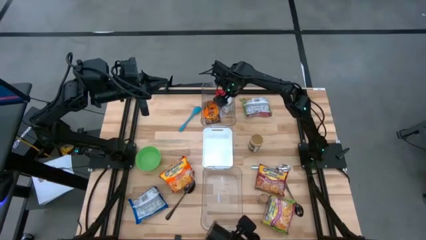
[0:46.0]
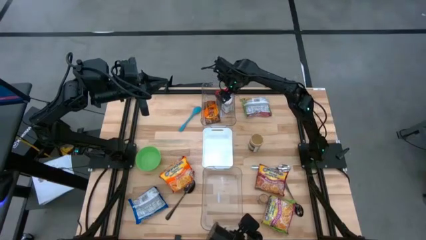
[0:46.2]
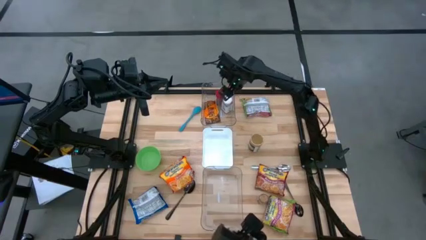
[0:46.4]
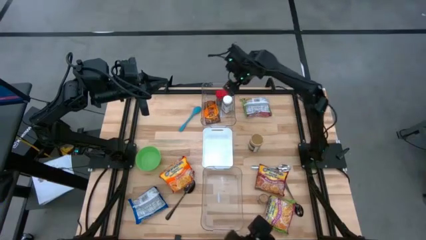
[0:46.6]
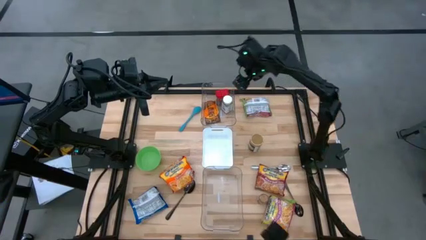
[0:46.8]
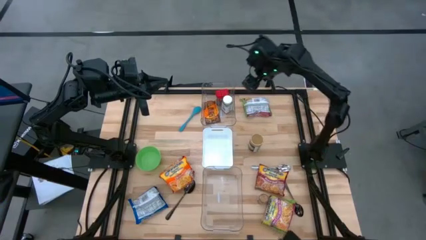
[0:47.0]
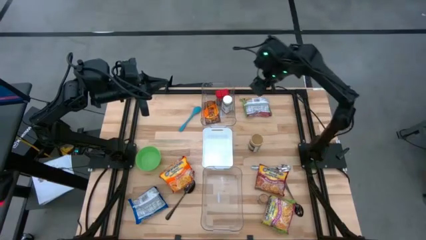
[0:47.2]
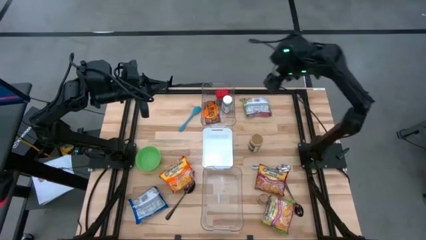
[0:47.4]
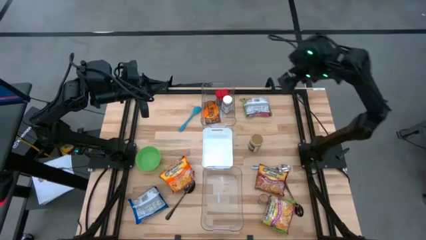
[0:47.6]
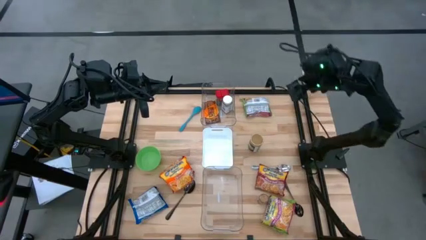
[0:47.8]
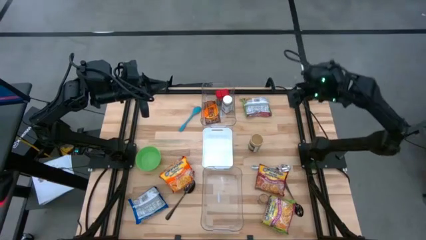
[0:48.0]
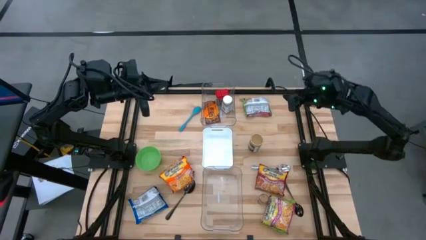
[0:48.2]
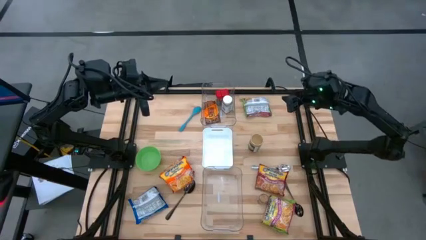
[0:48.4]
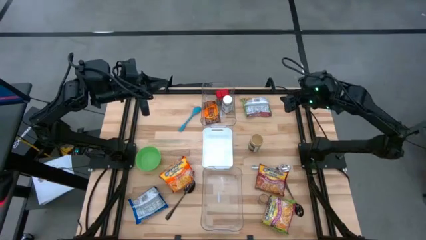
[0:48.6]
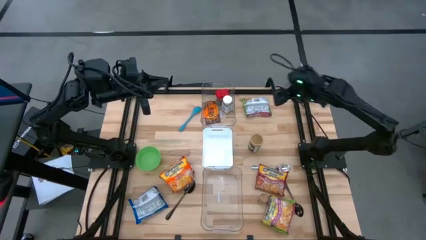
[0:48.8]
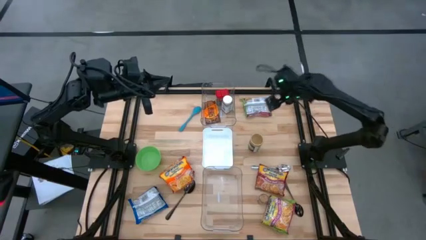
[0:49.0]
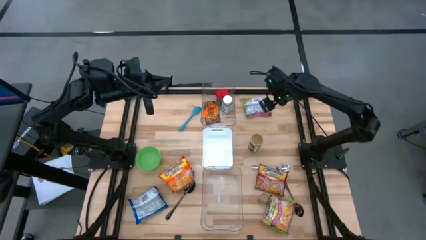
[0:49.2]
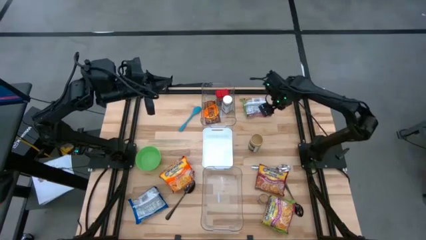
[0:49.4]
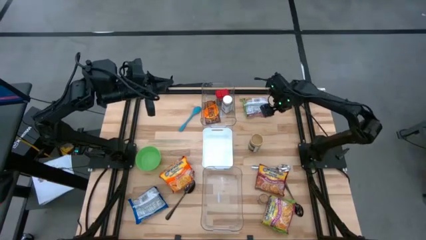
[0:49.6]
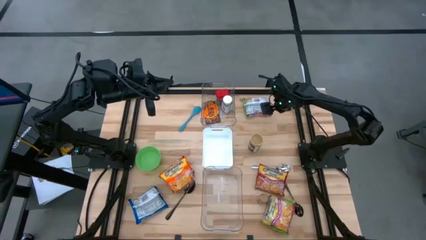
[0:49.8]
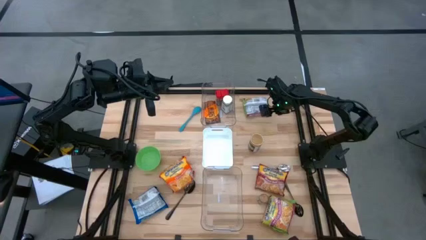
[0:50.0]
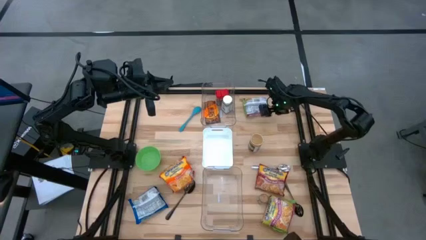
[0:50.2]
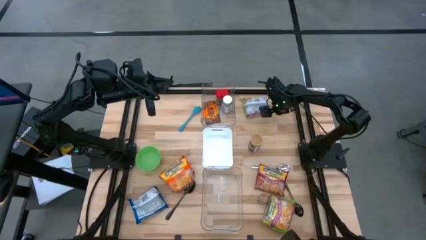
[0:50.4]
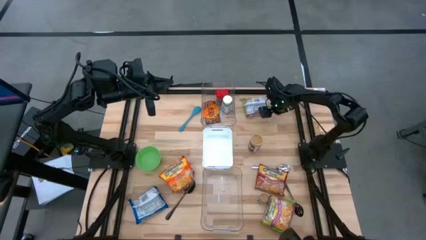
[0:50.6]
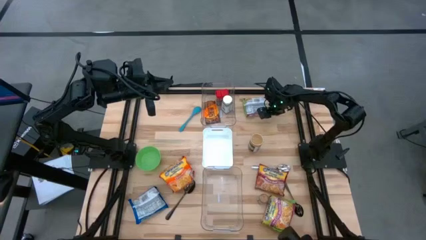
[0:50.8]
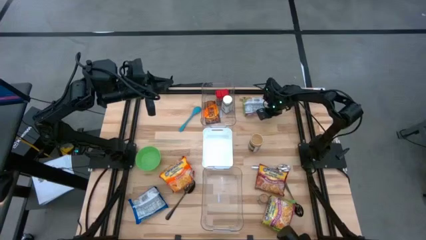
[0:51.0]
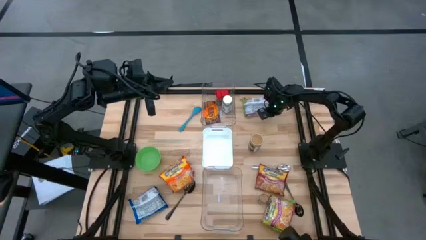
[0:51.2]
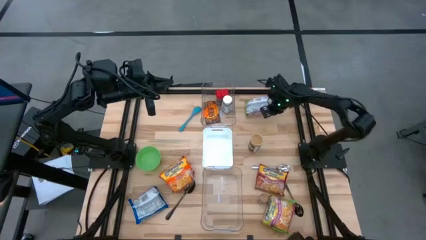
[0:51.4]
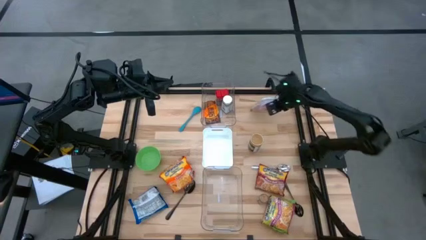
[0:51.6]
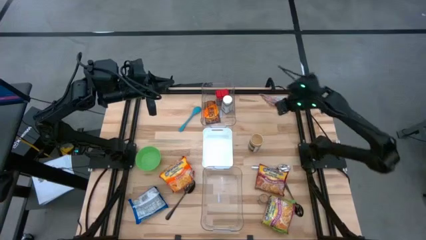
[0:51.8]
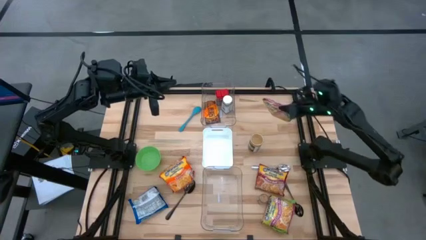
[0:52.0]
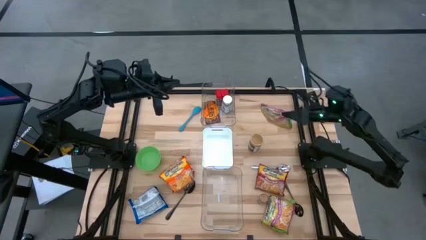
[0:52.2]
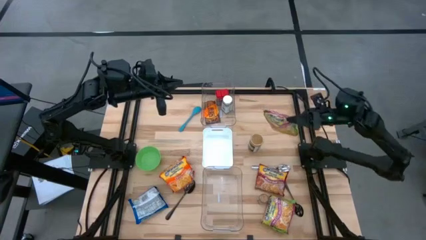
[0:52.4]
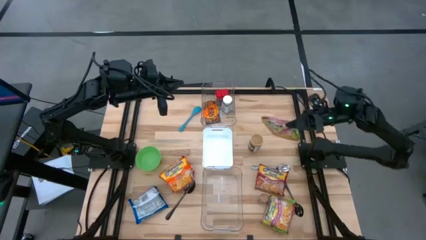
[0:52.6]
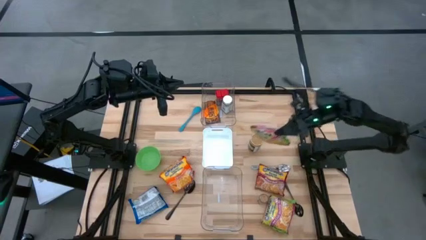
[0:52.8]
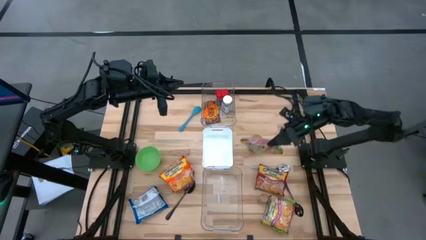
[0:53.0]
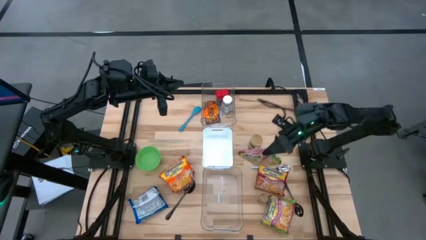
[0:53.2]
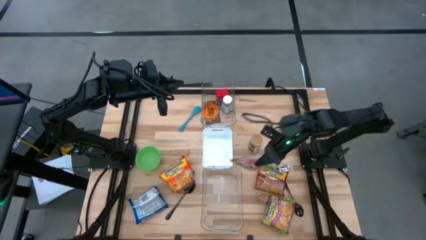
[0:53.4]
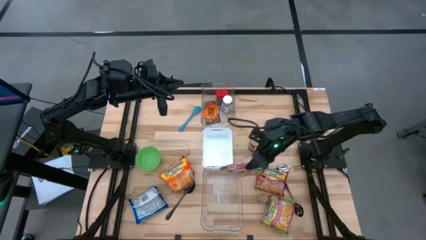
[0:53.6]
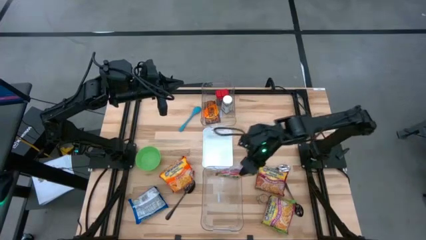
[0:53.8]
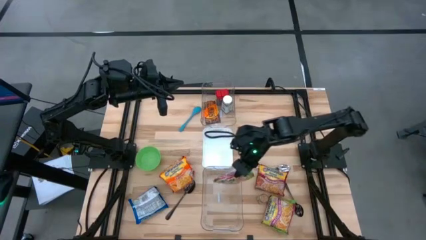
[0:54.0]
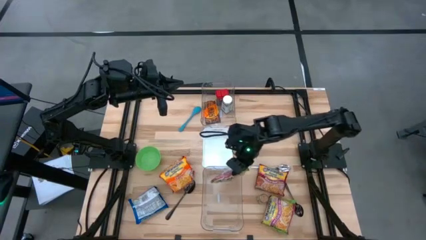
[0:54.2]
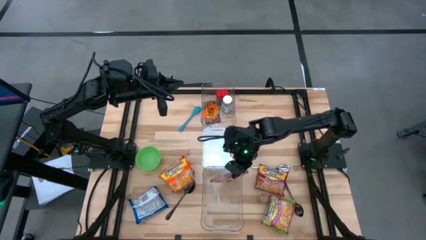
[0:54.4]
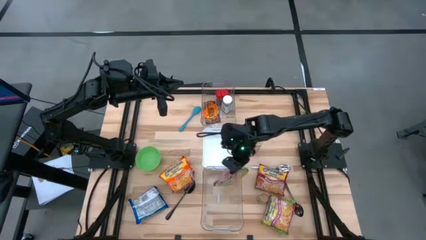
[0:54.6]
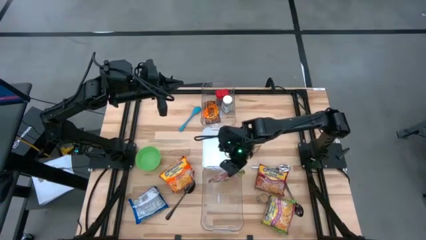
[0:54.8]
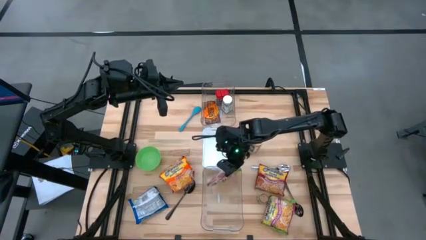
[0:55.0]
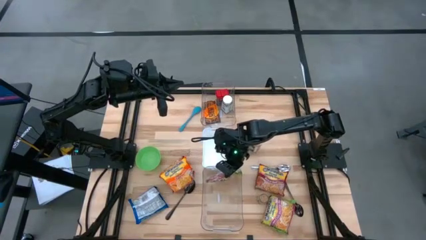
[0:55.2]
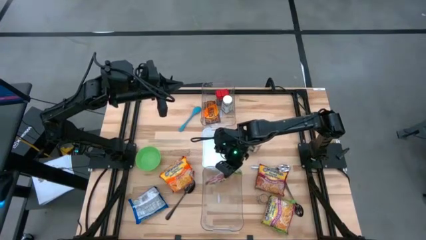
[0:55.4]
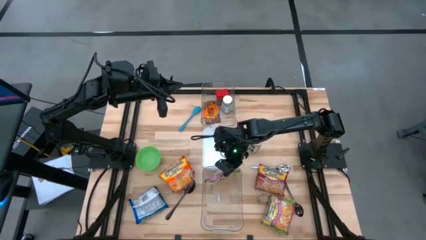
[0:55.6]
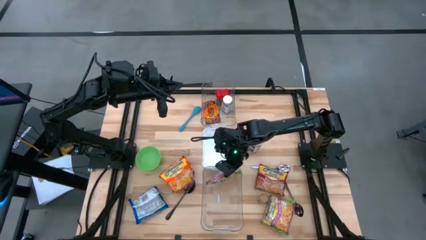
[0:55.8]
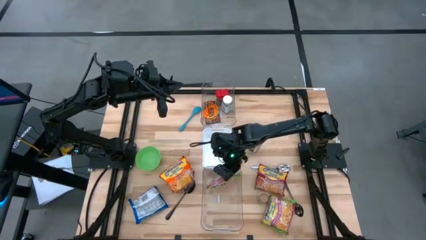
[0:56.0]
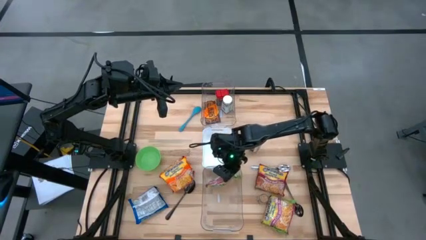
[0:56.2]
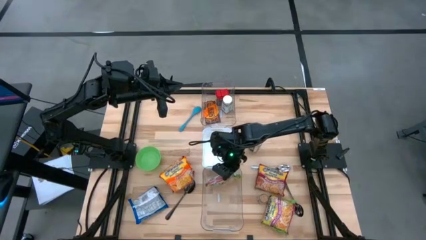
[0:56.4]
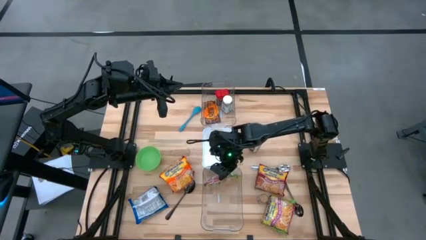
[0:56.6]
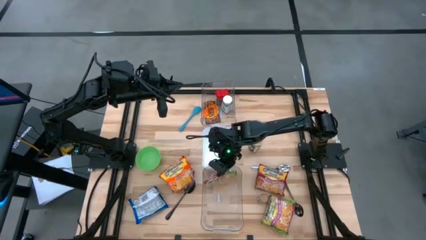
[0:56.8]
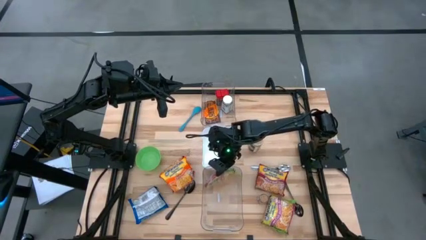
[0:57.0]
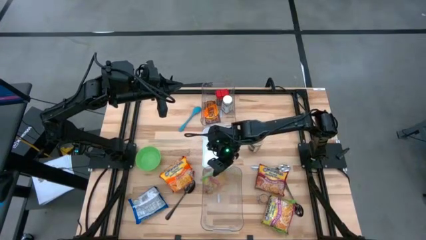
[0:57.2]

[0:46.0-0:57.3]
Task: Pick & Place Food Item
Put the top green noodle pack into the bottom transparent bin

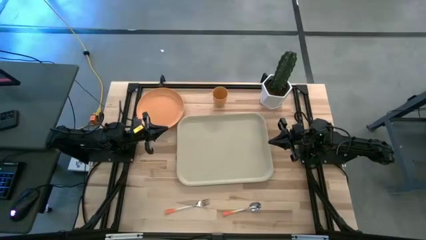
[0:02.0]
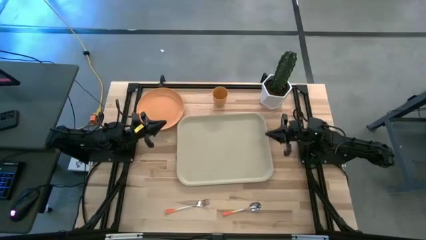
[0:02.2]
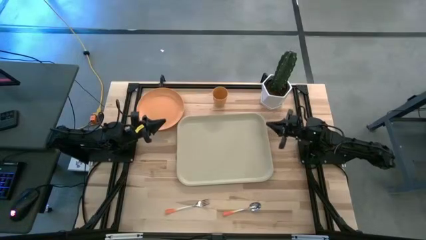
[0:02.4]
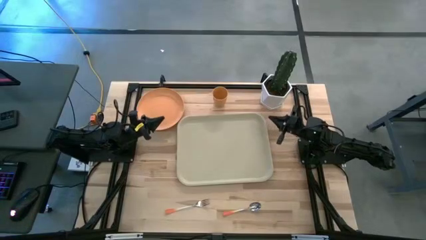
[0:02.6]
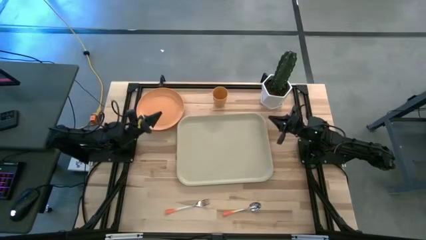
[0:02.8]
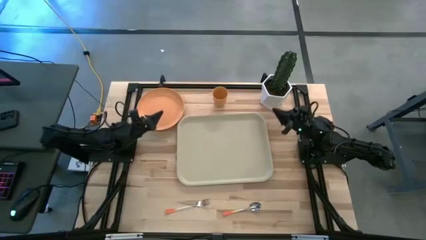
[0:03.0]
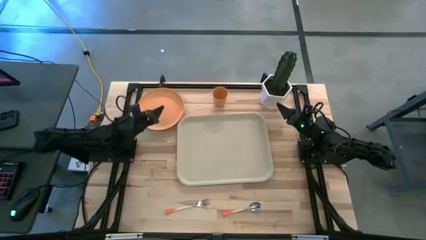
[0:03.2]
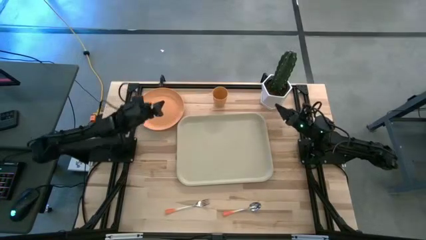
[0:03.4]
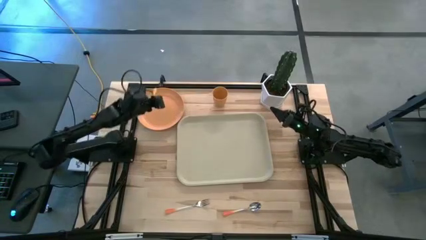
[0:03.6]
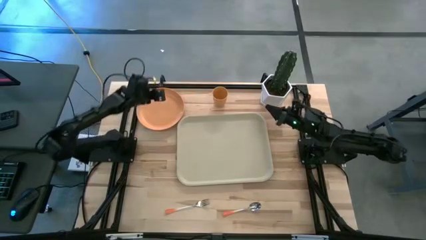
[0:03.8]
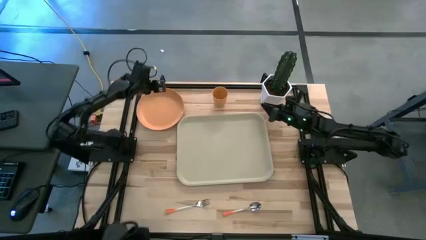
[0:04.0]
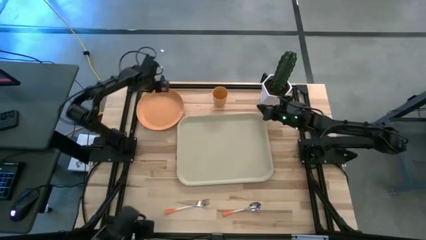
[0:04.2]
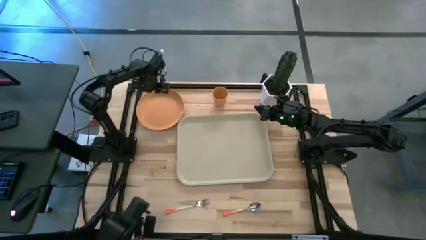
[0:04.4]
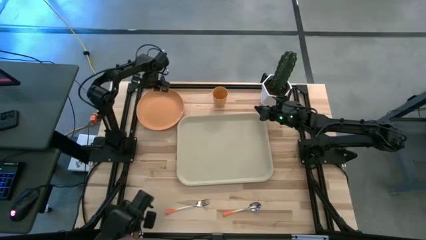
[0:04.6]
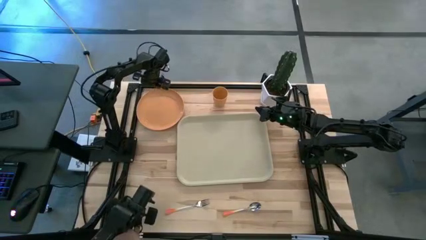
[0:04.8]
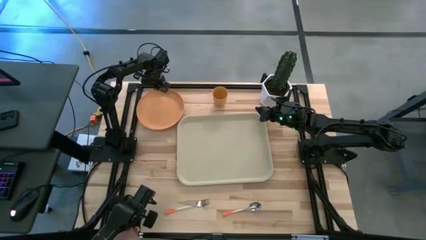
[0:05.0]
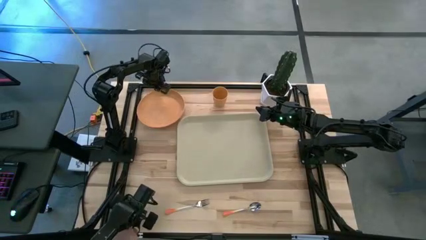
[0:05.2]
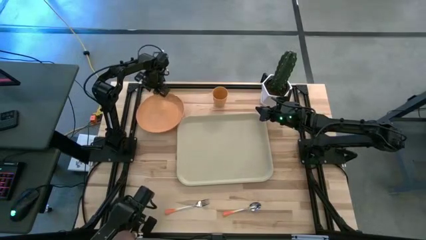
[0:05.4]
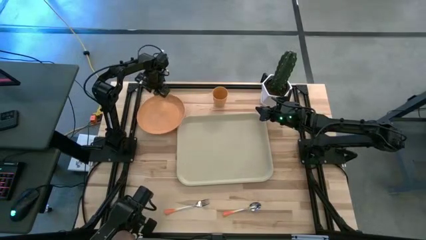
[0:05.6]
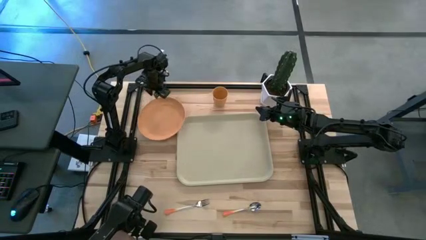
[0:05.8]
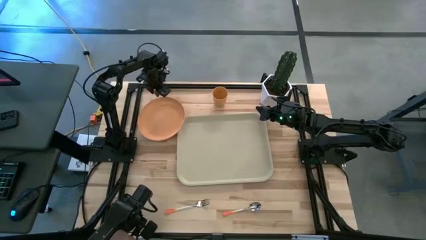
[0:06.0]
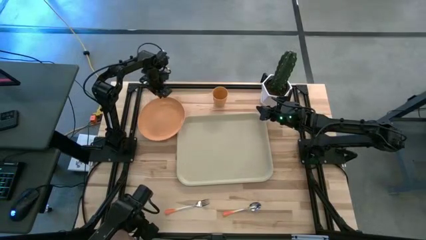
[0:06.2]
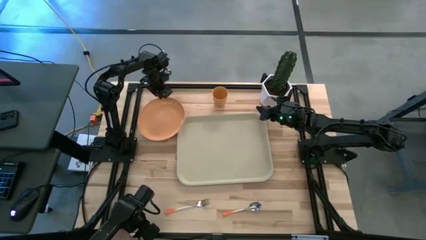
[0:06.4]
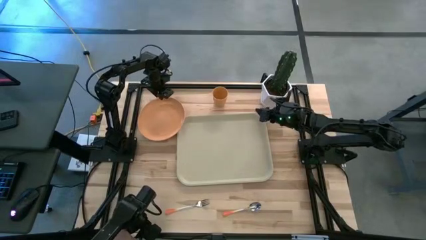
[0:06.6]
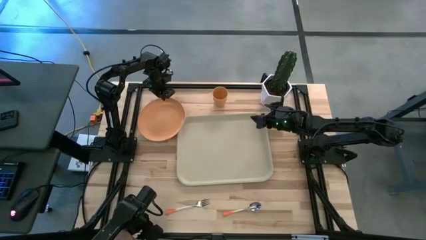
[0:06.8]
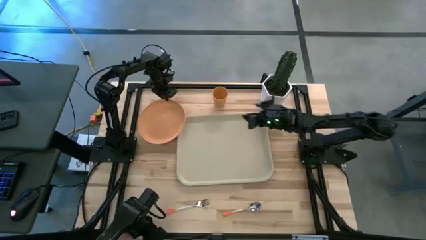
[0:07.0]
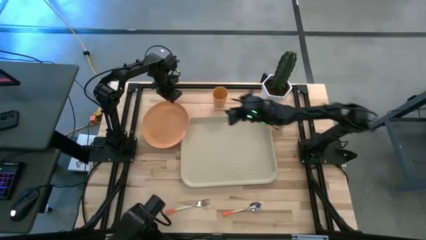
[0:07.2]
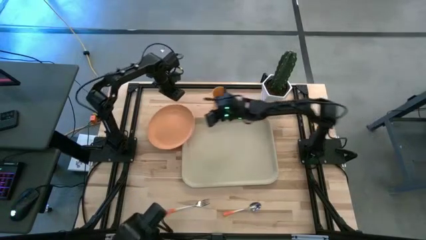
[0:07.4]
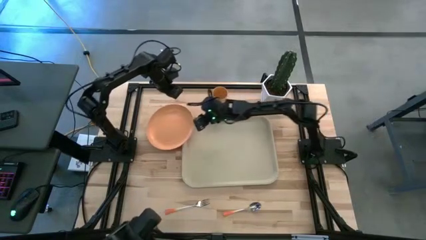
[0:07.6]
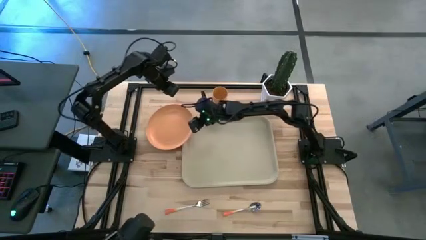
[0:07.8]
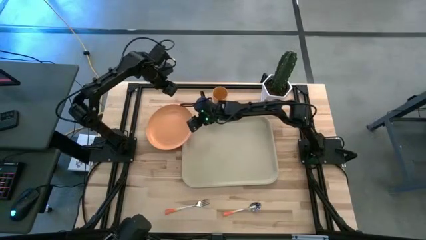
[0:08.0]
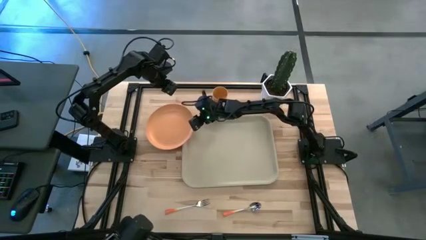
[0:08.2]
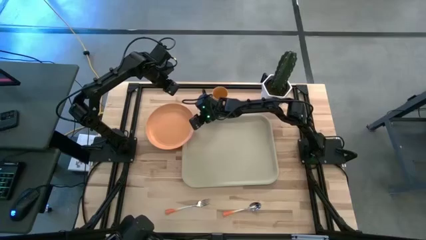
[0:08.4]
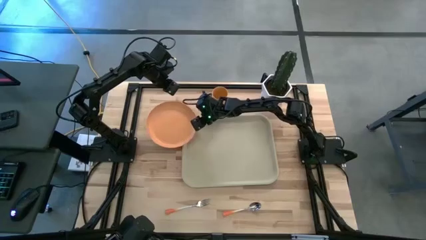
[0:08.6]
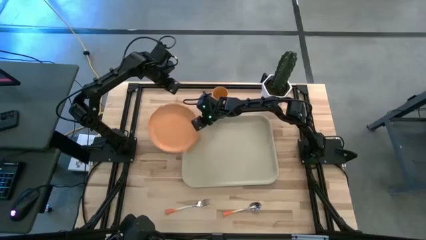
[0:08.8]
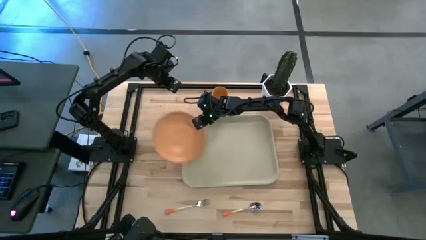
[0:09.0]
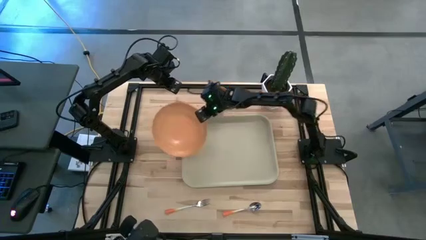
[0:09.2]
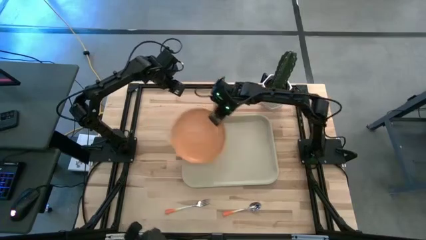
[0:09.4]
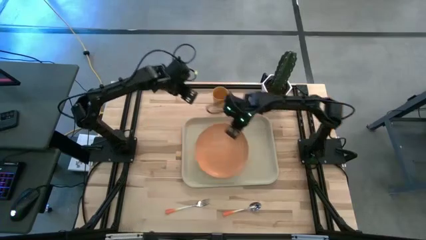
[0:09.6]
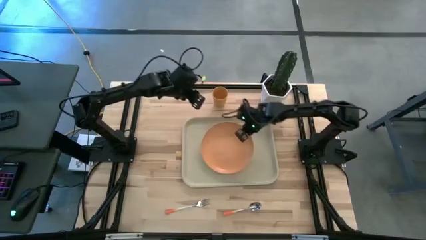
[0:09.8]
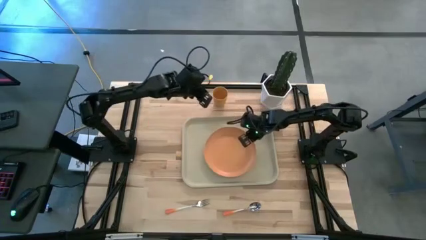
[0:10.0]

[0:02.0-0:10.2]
Task: Pick and place plate/cup/fork/spoon on tray
Put the orange plate on the brown serving tray
